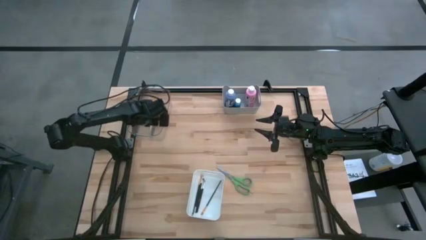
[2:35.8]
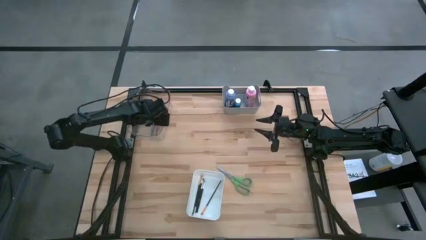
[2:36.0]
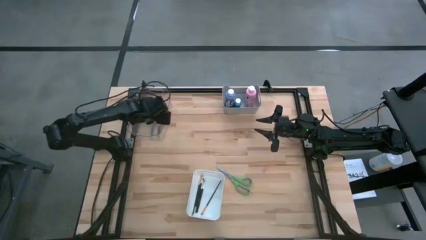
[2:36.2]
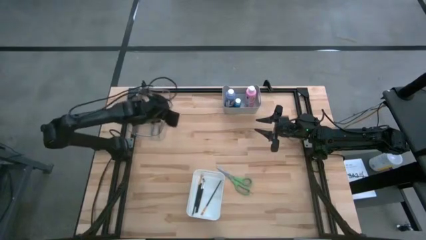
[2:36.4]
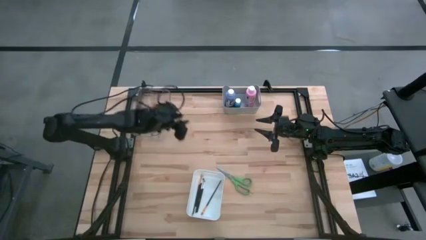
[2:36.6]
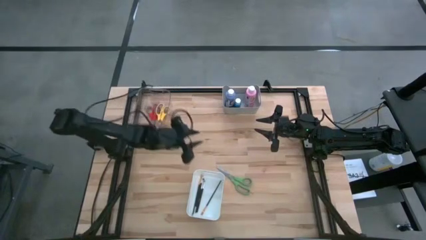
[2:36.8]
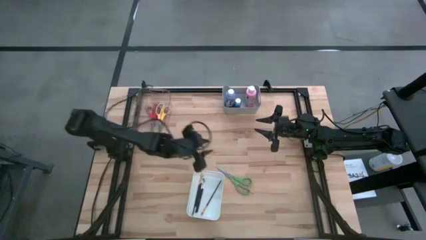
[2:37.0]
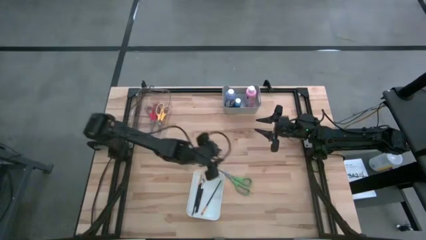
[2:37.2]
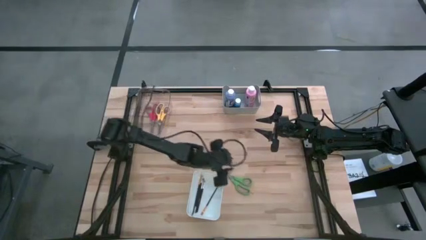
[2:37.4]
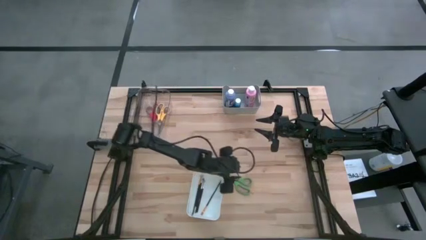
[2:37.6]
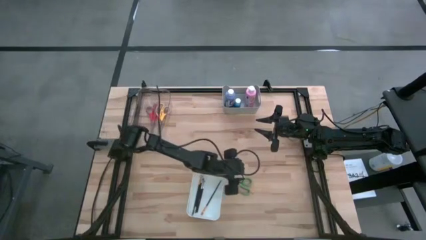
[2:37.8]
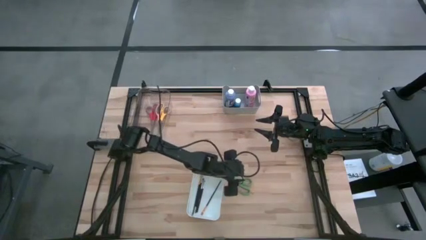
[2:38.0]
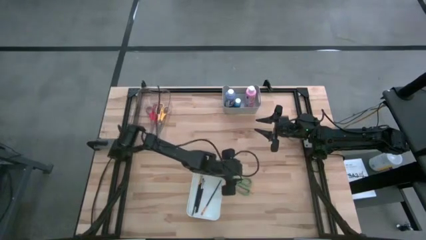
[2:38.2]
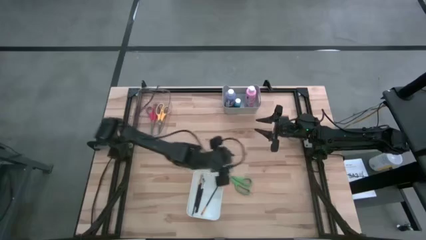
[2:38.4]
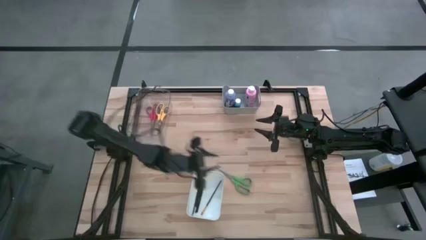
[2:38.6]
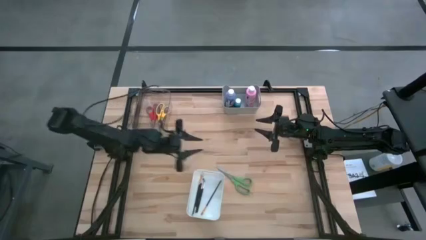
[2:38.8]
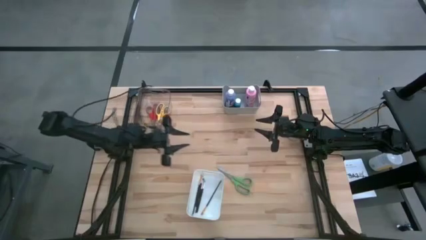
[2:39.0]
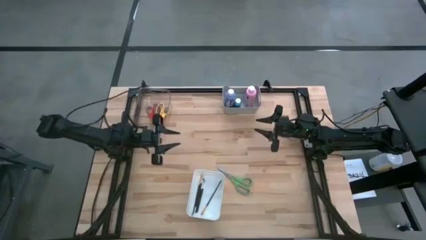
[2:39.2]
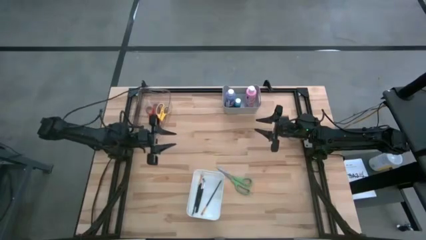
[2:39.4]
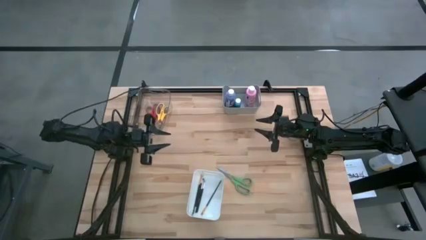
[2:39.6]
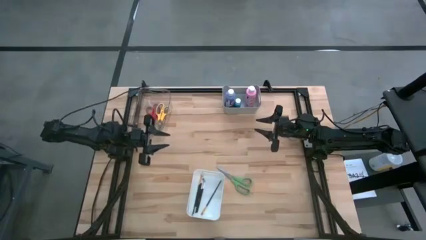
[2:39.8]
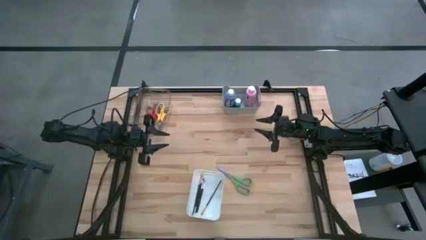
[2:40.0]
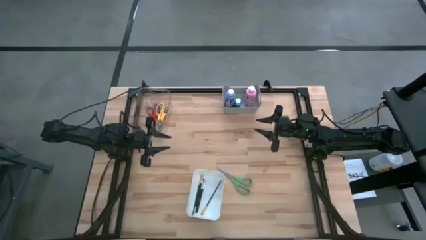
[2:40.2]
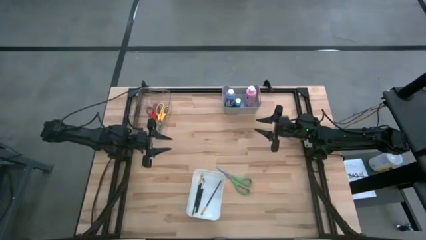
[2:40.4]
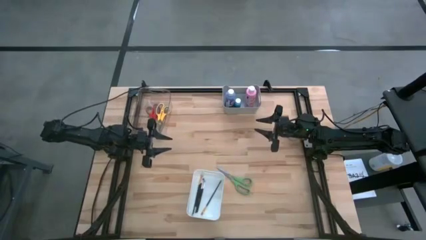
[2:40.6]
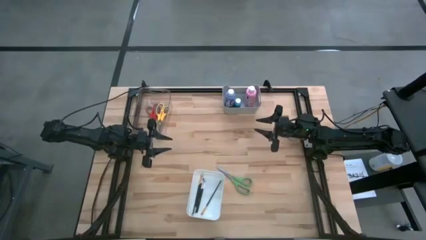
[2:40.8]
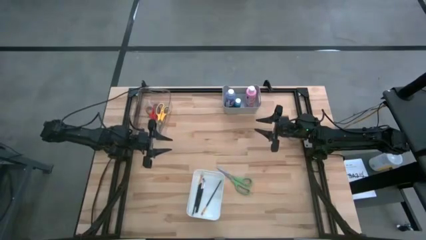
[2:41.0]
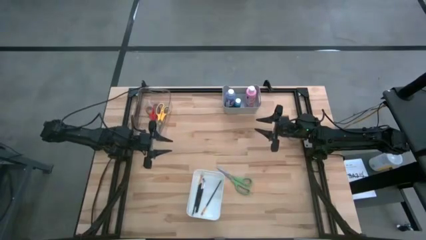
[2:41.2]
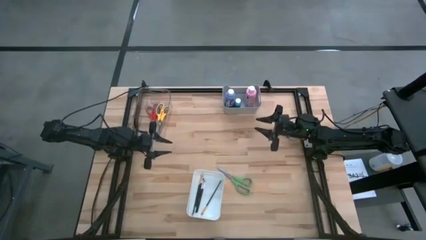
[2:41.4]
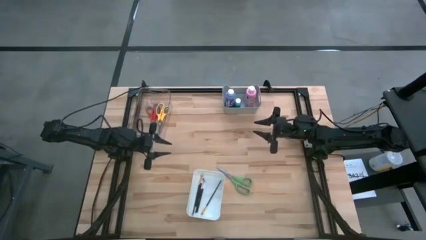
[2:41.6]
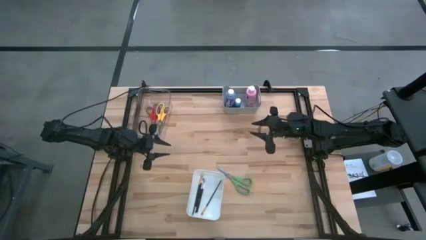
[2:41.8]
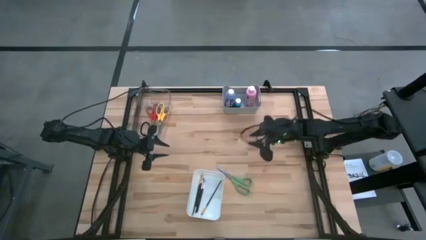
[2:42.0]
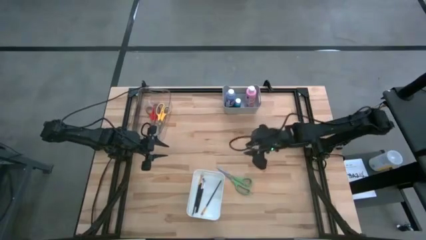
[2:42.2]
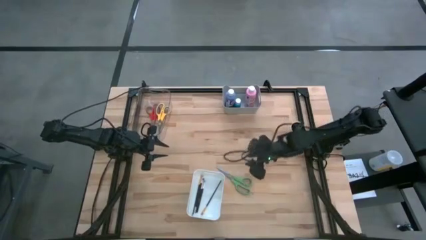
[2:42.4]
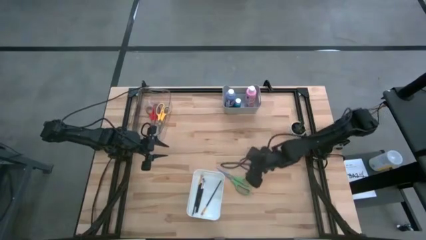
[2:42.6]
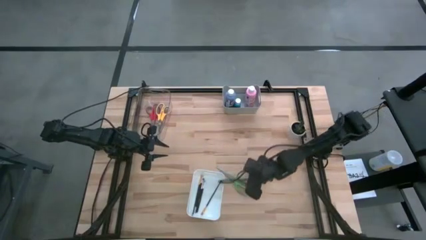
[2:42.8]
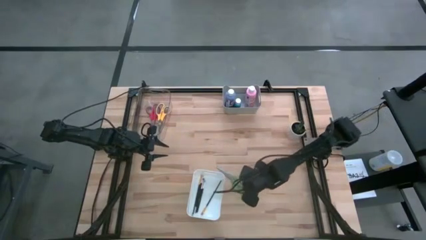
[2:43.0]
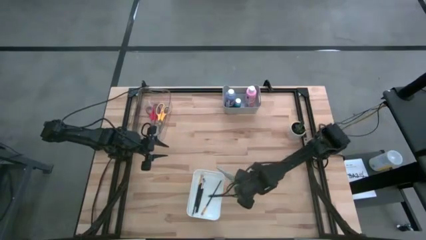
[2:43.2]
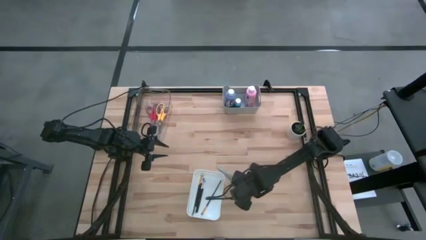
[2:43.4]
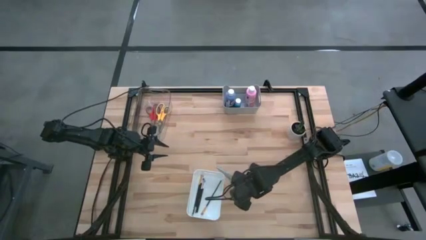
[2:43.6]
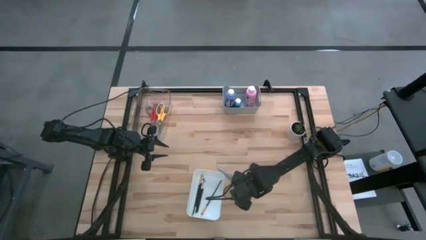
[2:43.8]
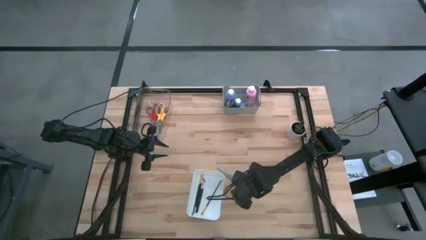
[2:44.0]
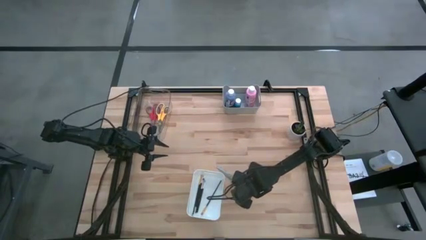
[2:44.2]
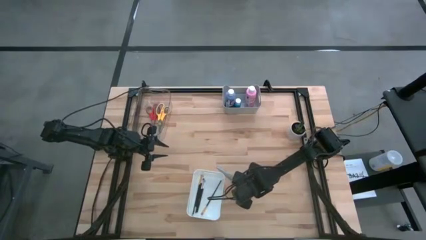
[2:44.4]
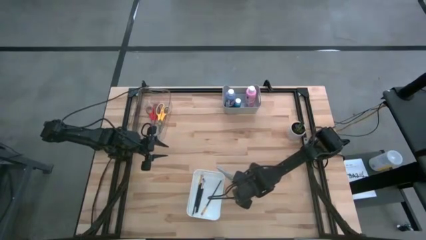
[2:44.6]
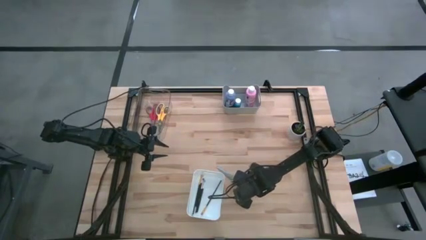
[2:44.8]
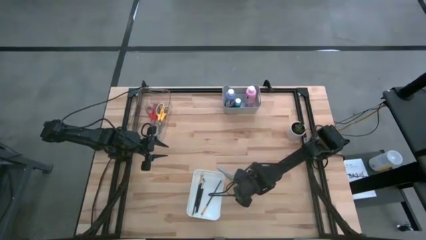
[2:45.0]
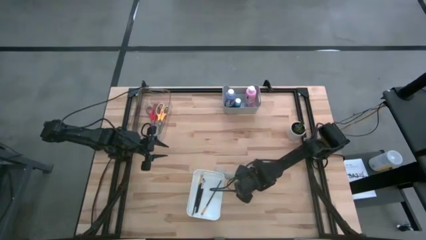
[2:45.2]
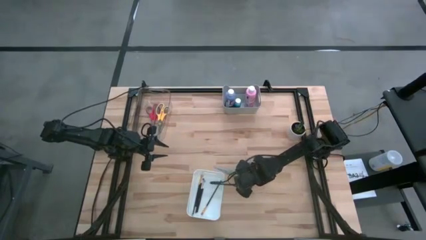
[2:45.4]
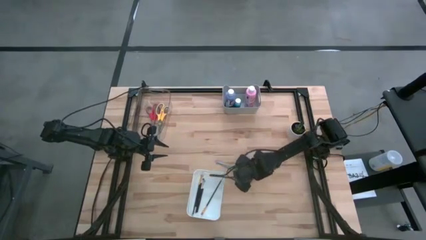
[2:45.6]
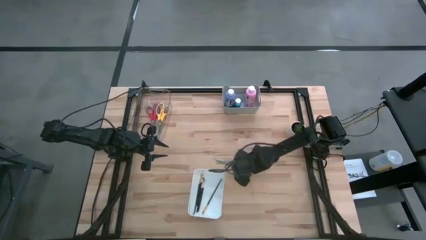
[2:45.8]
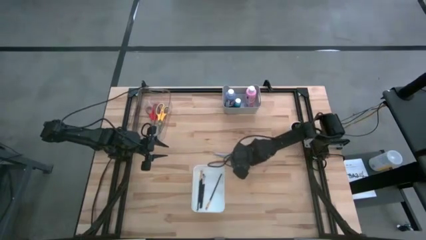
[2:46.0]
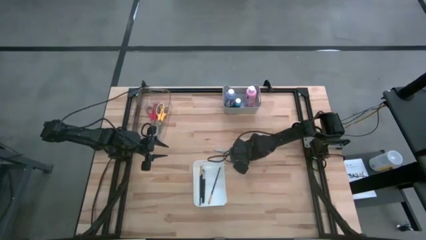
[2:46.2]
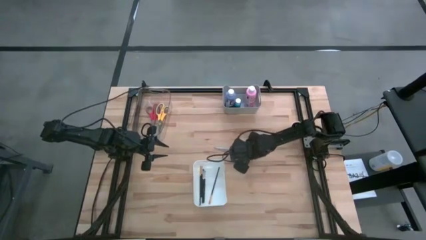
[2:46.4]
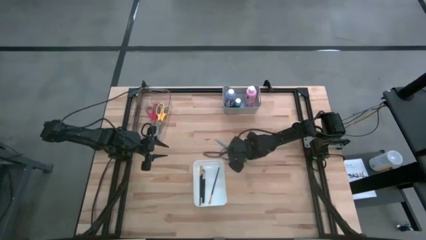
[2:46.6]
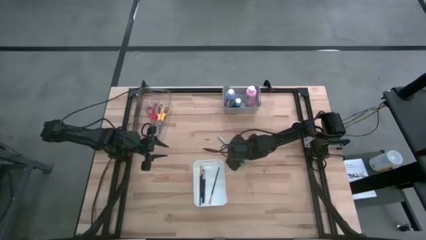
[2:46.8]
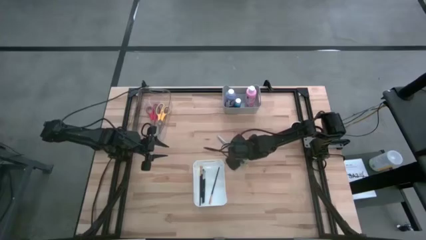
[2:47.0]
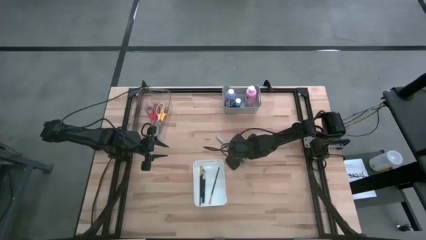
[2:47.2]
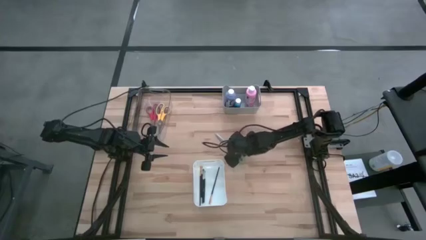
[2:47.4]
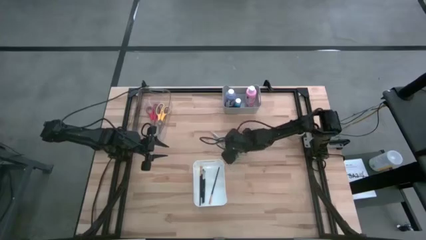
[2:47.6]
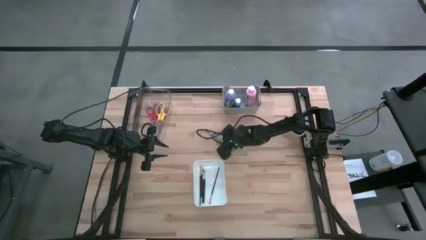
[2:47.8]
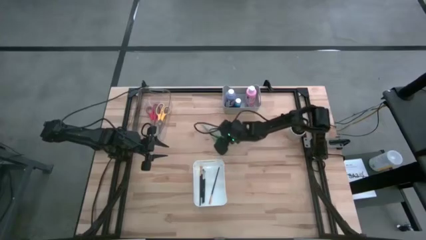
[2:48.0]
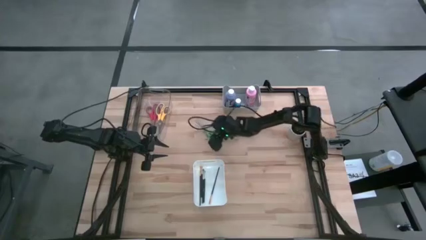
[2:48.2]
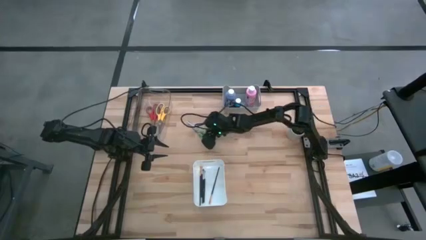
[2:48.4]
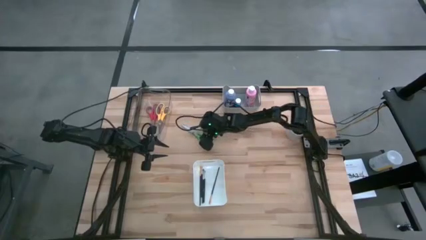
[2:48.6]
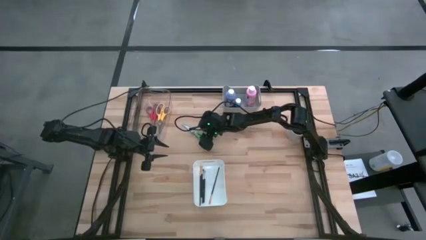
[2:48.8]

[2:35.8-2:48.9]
Task: Pick & Place Paint Supplies
Put the green scissors into the transparent bin

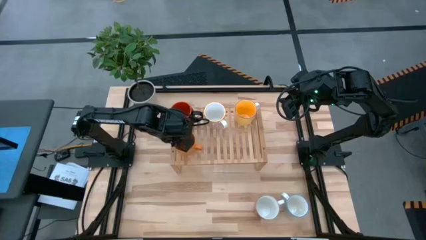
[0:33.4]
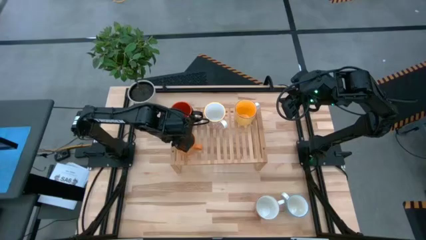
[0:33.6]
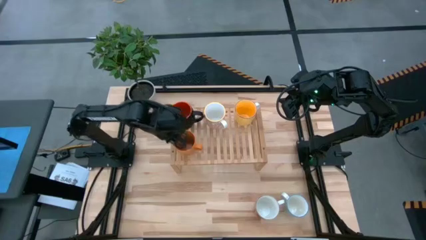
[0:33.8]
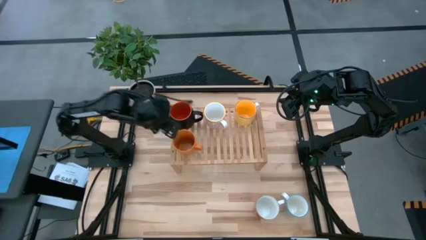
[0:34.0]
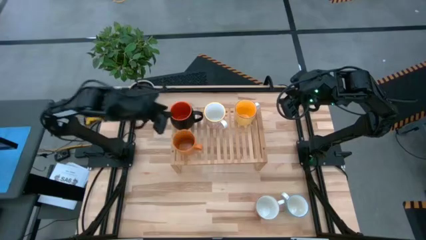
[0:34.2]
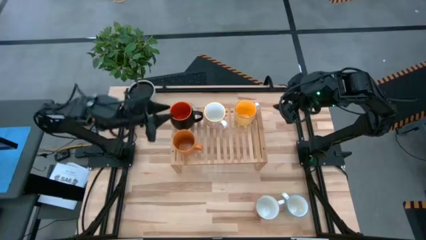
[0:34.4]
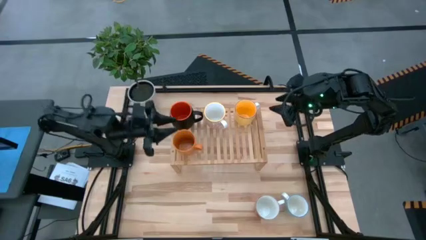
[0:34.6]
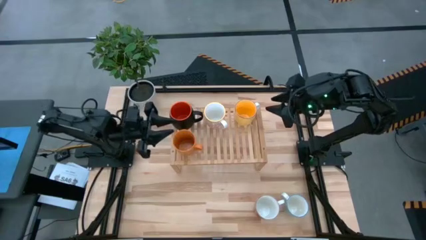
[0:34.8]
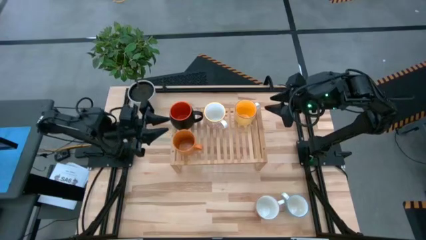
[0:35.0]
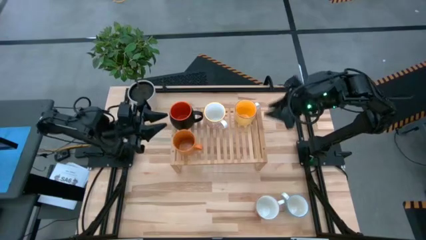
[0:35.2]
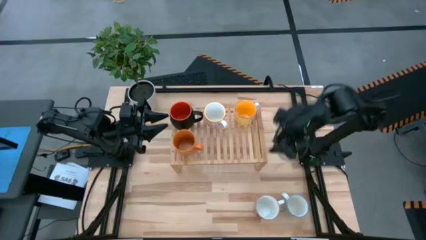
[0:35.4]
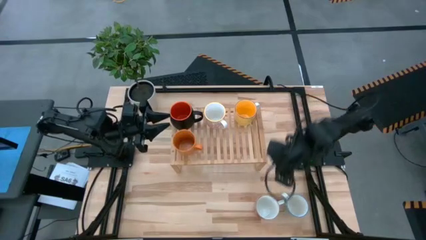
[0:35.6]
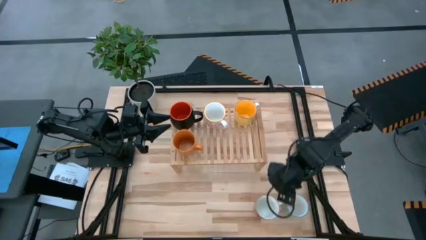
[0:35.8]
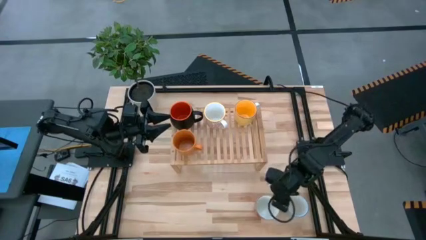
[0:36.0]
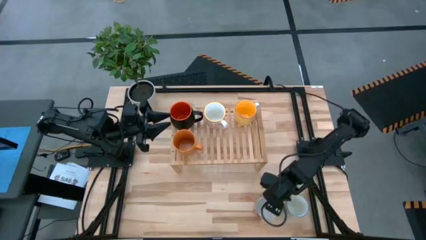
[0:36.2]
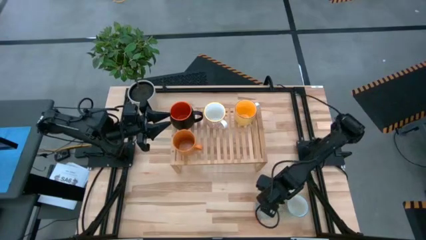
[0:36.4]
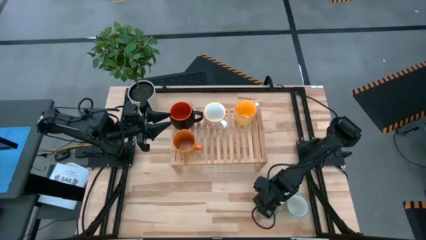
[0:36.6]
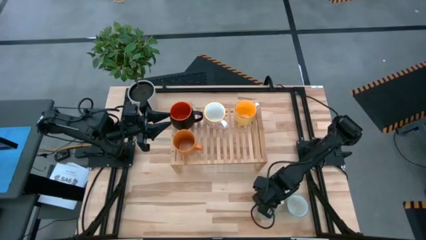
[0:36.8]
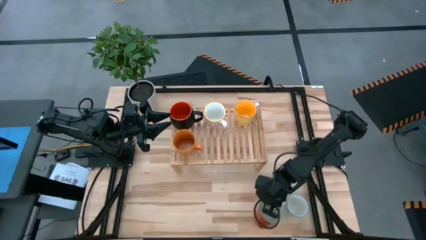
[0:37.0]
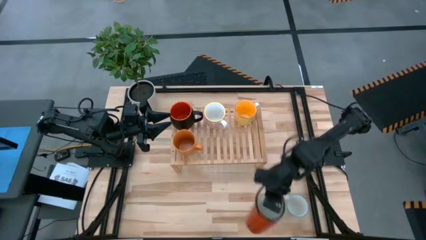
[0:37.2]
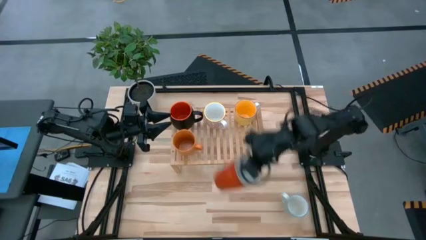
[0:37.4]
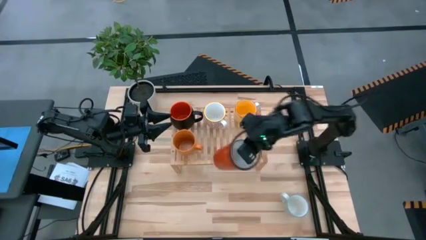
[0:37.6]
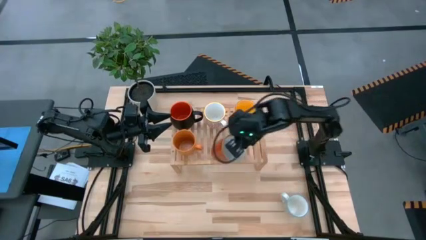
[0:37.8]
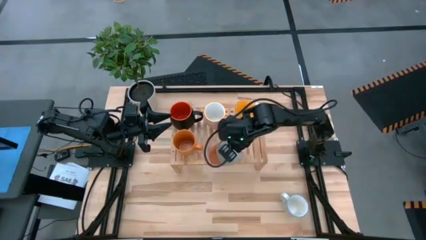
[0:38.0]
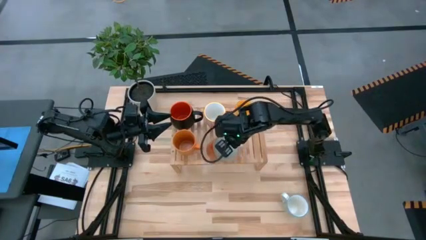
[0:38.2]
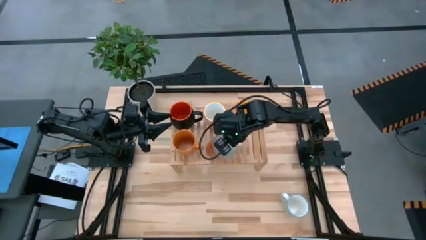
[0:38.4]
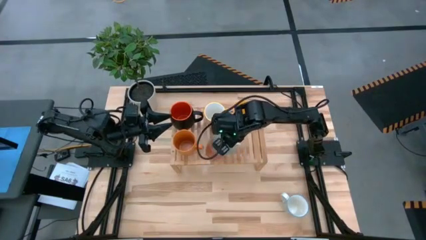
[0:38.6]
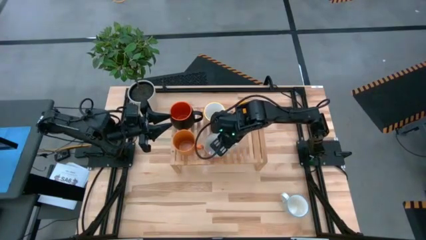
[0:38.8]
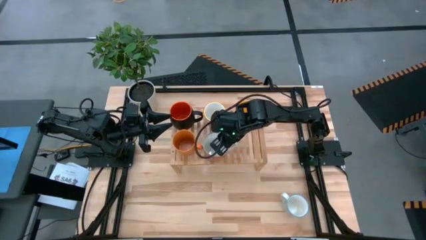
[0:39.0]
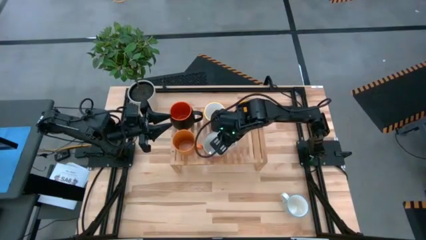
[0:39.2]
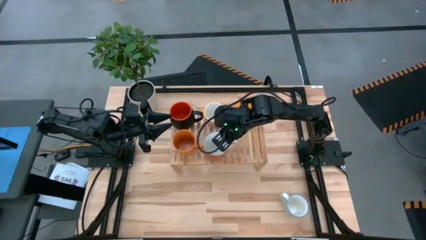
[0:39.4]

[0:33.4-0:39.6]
Task: Place coffee mugs
Put the white and orange mug on the shelf
